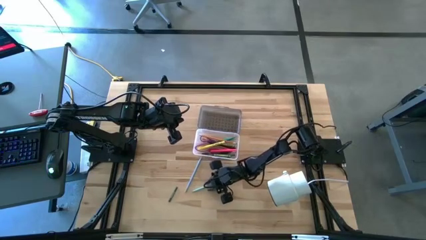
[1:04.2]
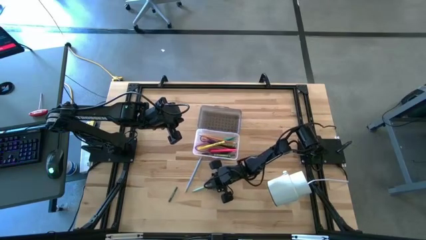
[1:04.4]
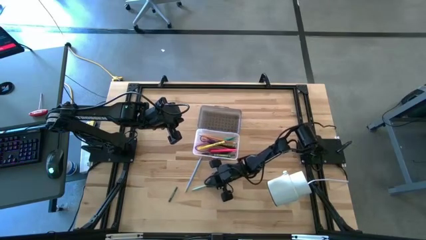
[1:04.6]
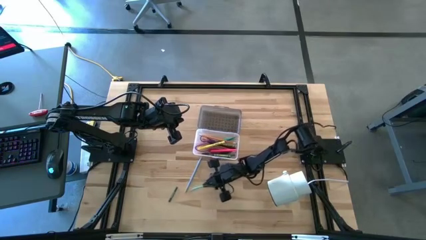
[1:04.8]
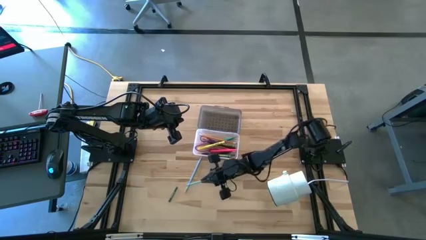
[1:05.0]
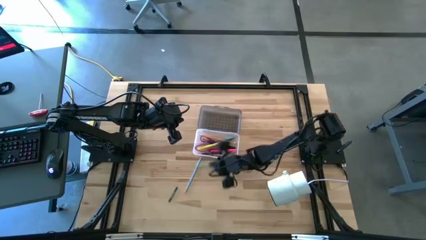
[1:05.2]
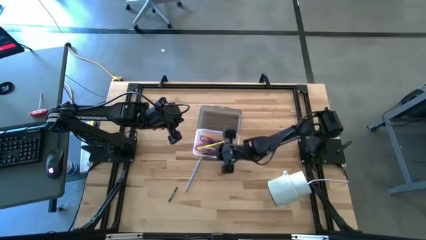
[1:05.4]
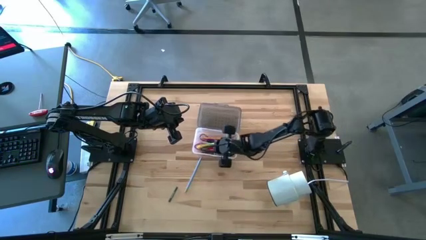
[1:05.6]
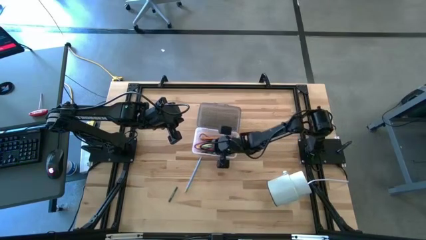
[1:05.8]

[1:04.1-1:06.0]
Task: Pick & place school supplies into a supply box
Put the light blue pencil into the black supply box

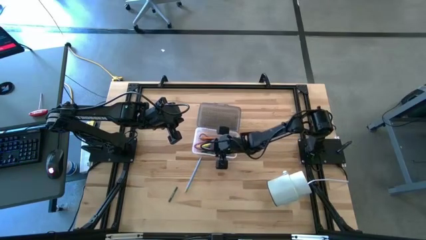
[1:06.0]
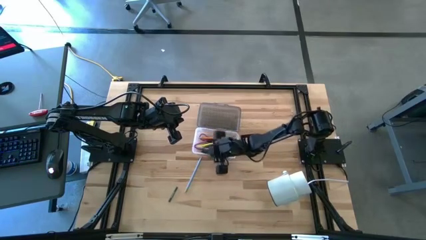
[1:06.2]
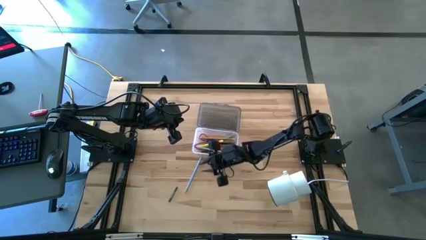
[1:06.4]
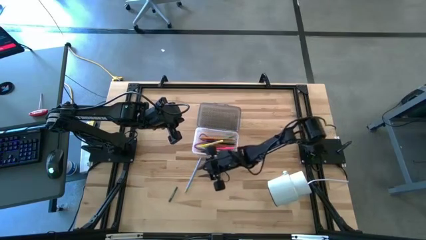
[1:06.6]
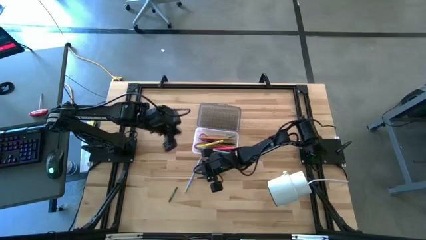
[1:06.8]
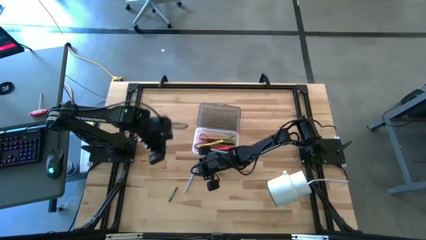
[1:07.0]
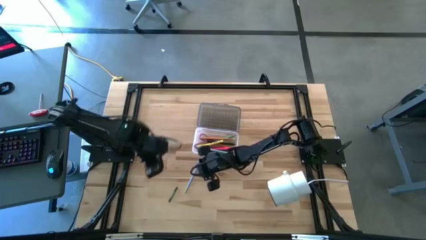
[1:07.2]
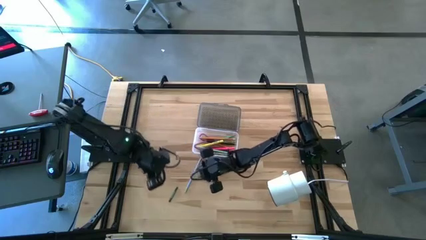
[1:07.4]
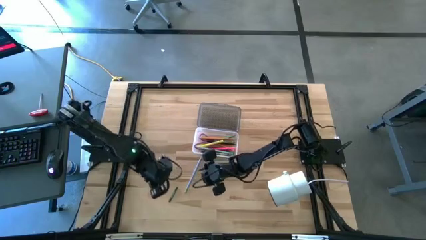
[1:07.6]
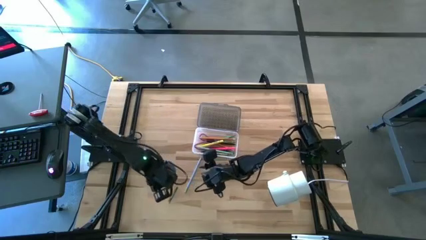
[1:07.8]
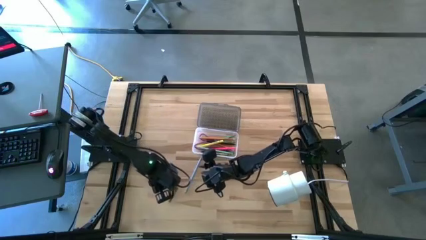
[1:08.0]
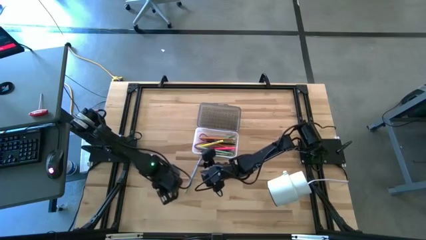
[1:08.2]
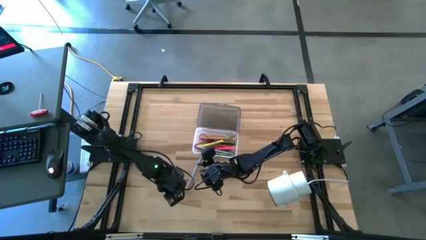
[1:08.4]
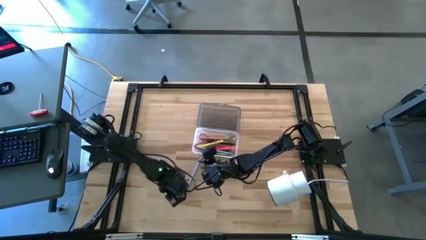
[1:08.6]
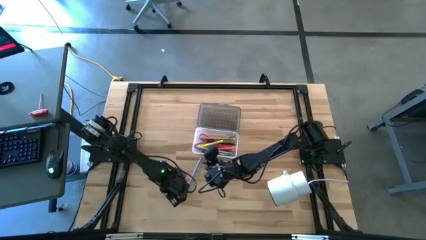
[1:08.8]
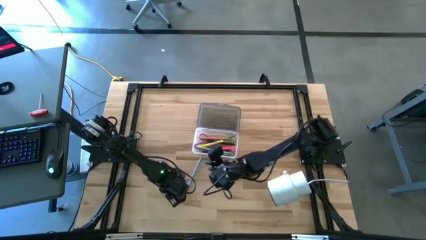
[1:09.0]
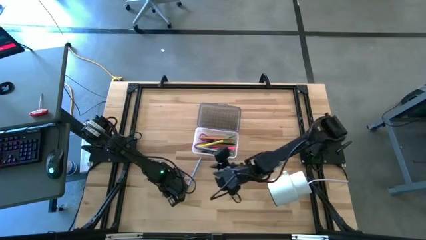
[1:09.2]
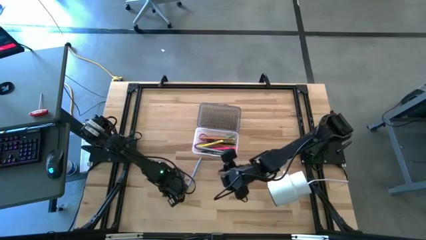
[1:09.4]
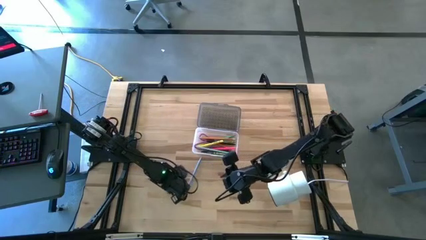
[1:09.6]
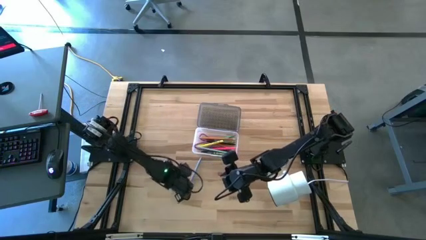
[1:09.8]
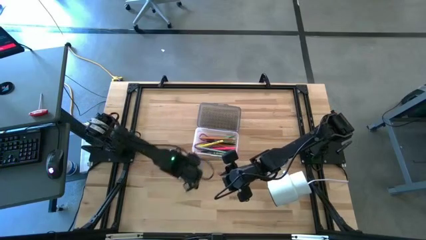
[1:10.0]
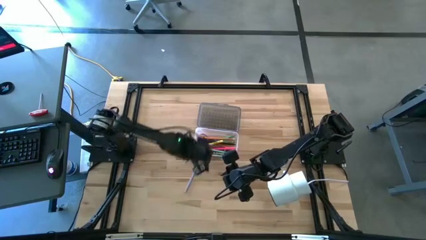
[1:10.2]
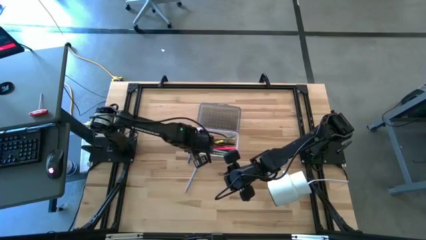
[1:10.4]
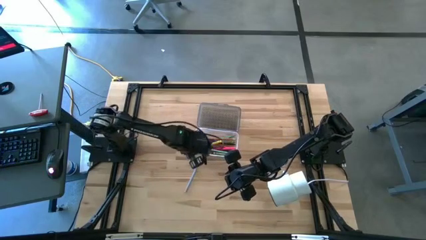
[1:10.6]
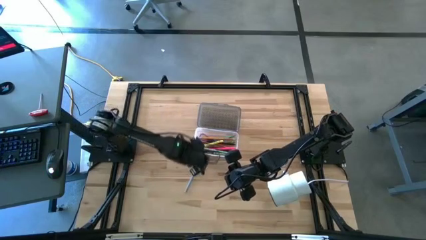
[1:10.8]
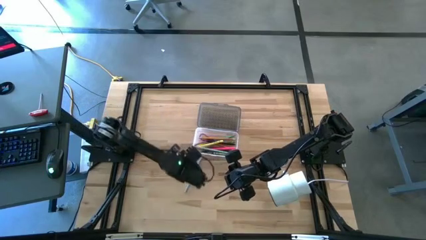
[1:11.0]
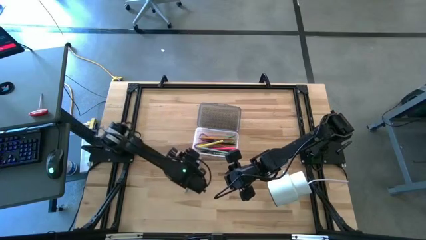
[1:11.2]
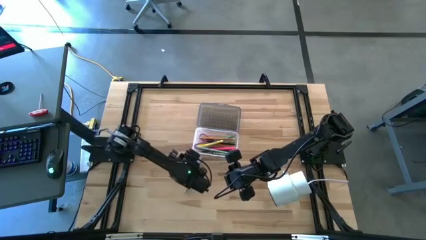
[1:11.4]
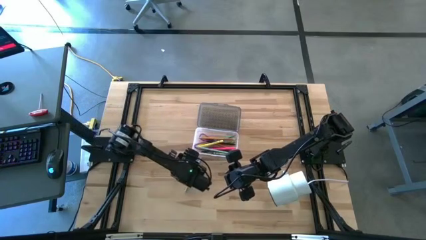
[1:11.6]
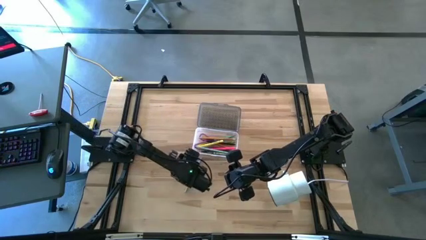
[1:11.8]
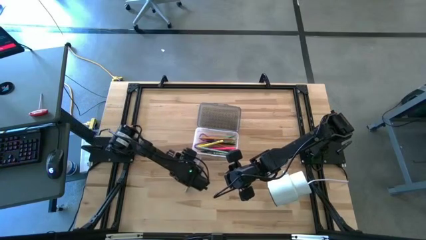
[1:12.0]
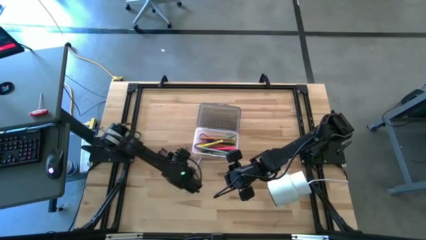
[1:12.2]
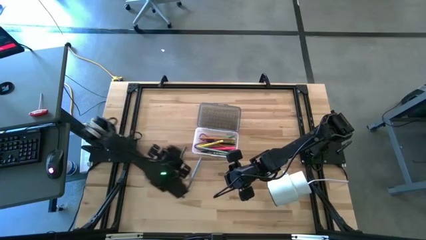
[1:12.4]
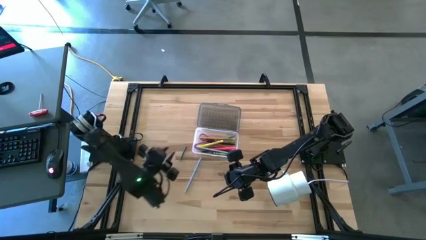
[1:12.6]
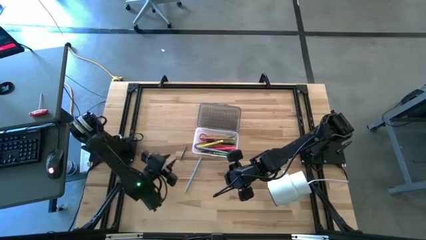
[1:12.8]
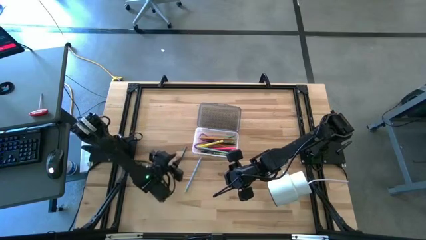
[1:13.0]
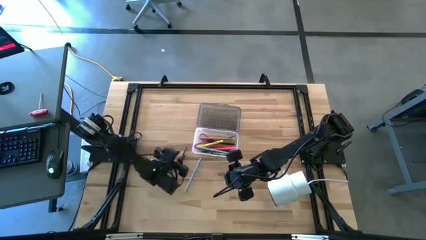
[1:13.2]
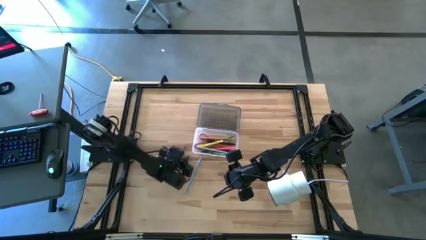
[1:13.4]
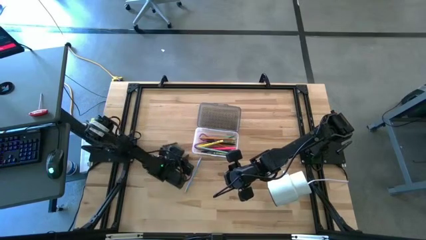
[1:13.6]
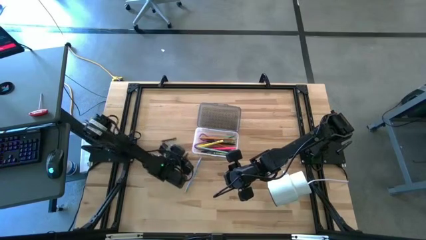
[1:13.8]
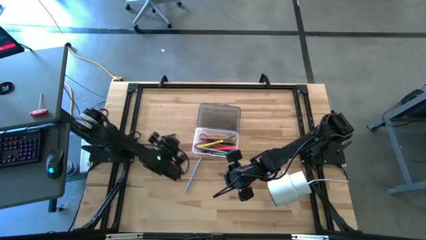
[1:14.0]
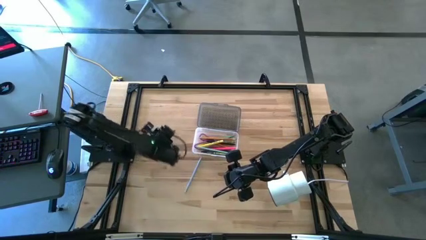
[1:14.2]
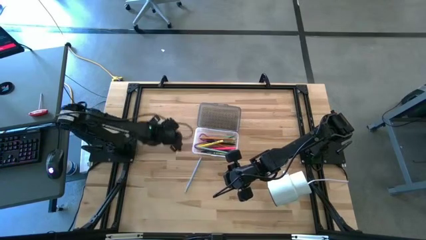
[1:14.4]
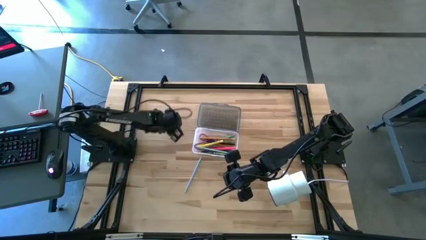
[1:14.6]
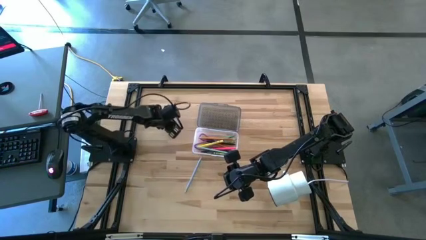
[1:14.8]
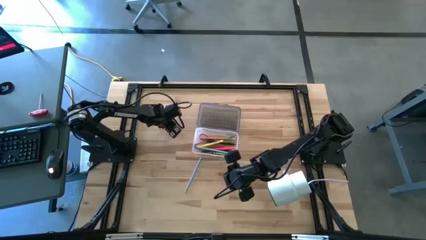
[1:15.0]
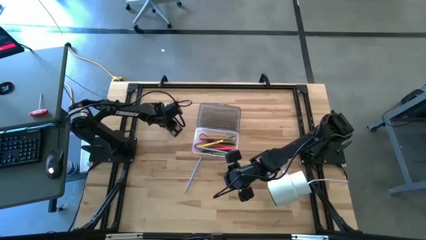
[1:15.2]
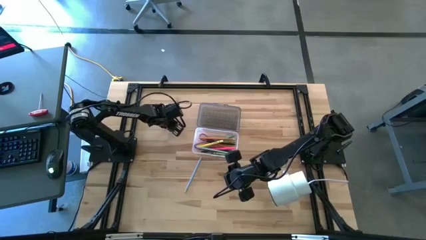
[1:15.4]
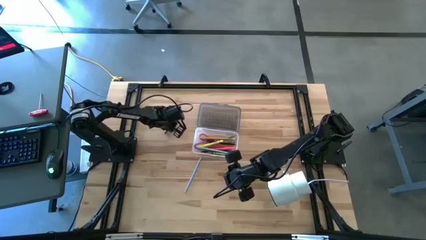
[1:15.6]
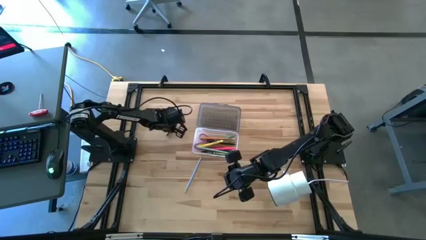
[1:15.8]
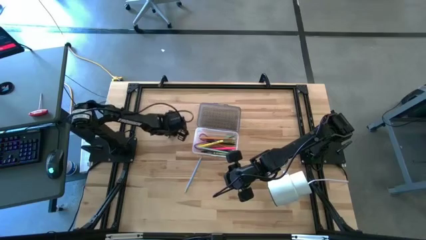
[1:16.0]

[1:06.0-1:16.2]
Put the dark green crayon into the black supply box

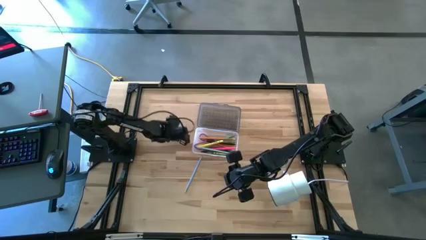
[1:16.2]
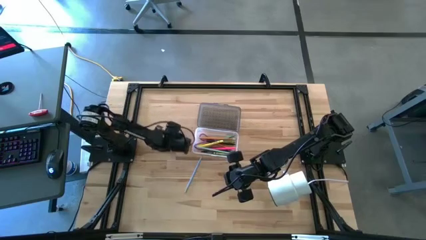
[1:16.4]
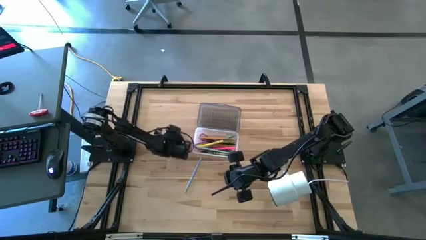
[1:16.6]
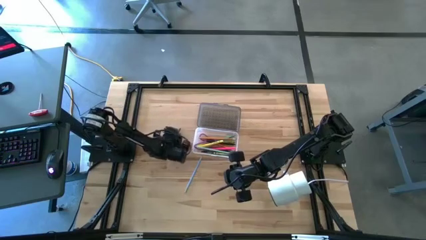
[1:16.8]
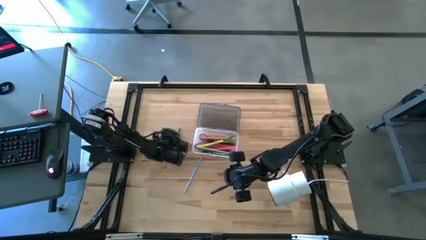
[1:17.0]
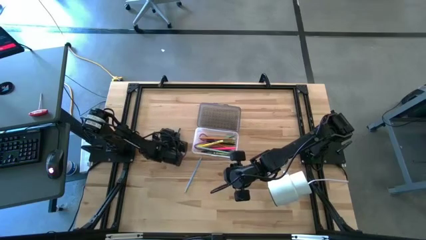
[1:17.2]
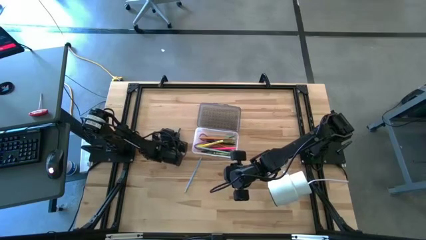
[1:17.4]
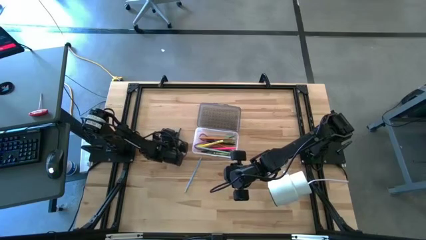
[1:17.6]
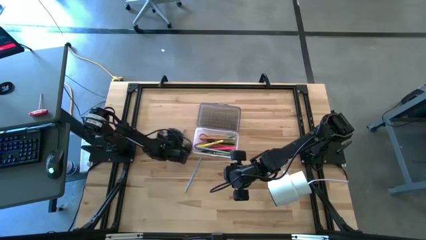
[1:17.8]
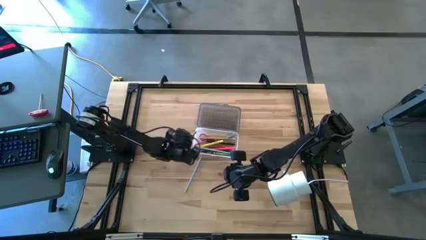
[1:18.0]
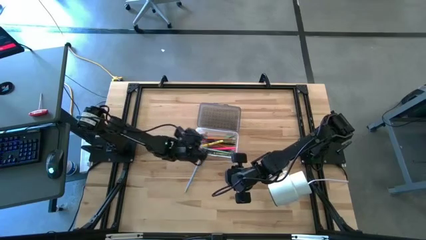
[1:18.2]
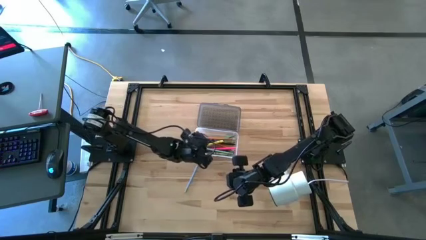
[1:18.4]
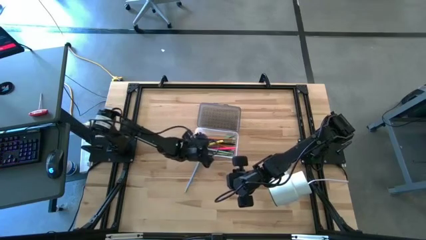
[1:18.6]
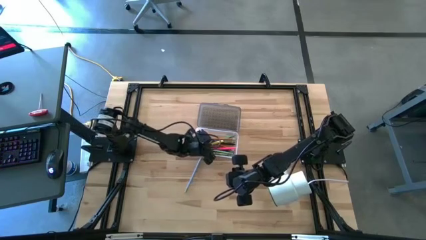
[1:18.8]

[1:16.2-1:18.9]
Put the dark green crayon into the black supply box

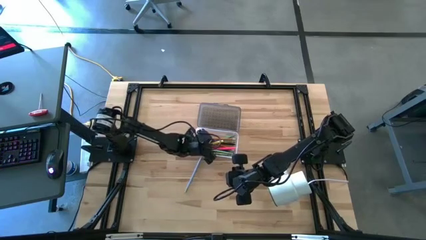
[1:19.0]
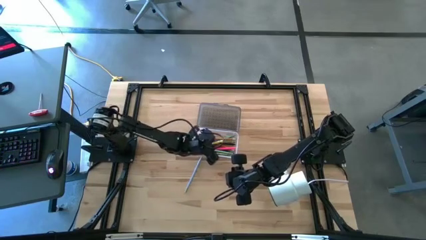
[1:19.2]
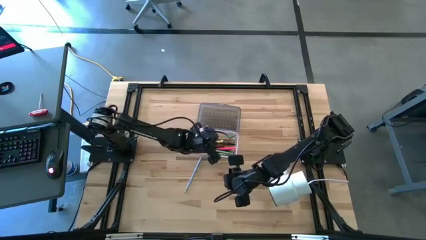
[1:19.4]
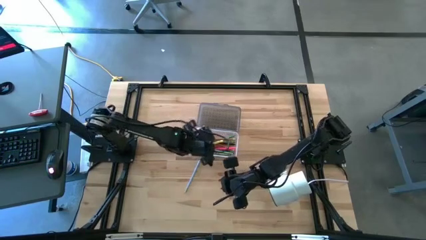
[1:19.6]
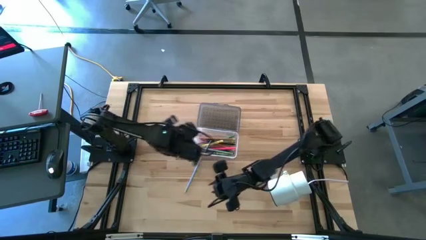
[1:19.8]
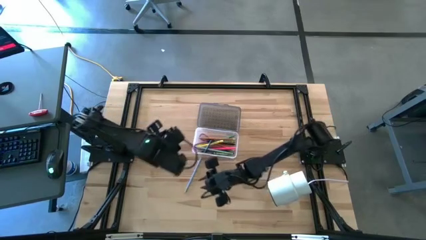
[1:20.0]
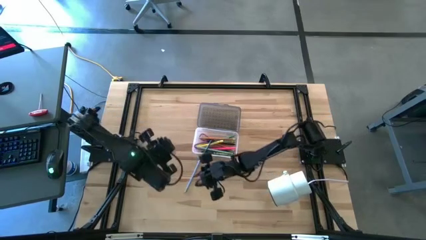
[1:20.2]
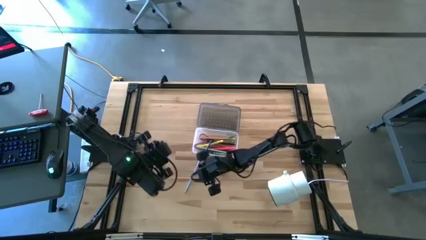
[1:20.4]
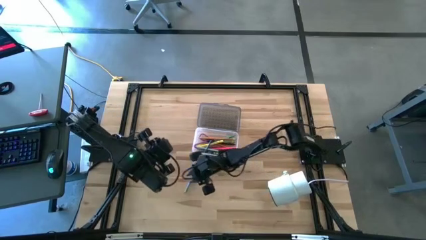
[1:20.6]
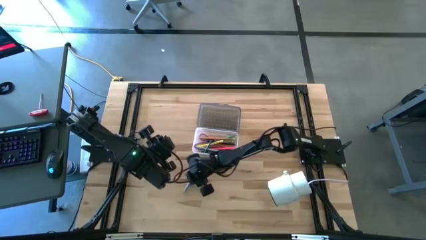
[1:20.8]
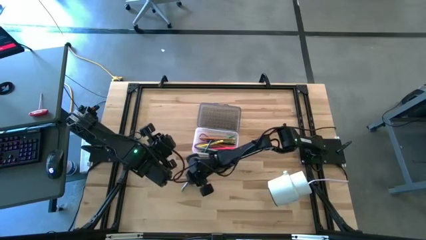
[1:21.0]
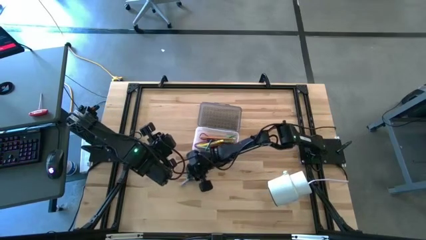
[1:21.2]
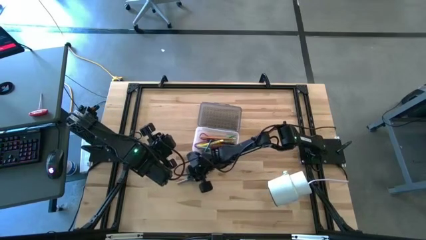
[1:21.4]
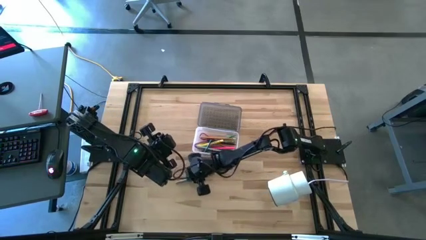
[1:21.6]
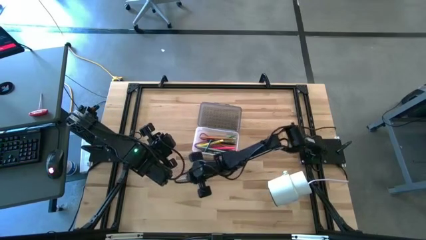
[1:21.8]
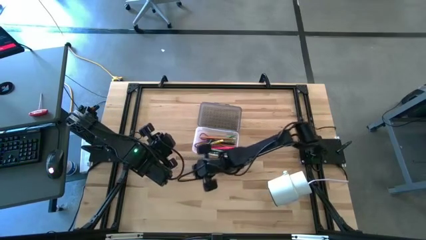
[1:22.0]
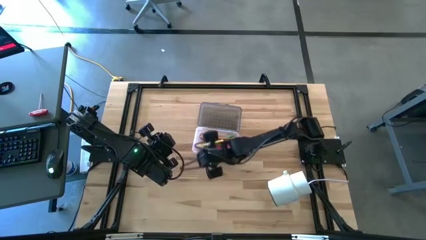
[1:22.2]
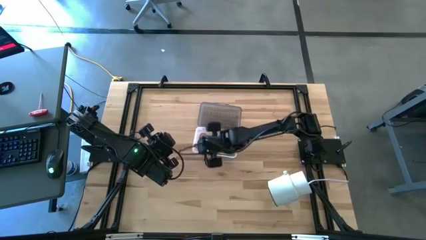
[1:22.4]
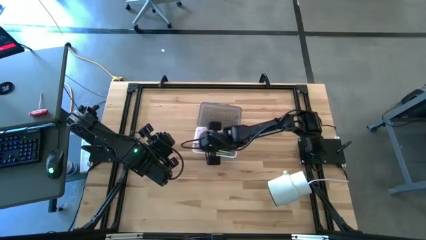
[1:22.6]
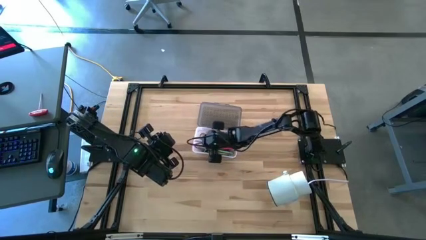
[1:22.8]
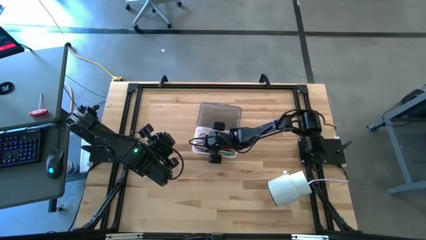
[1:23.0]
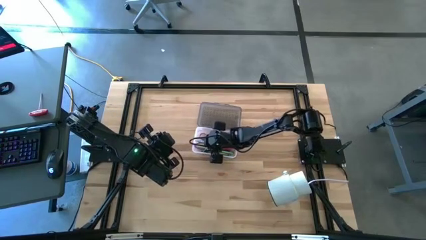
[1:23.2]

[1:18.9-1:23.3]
Put the blue pencil into the black supply box
